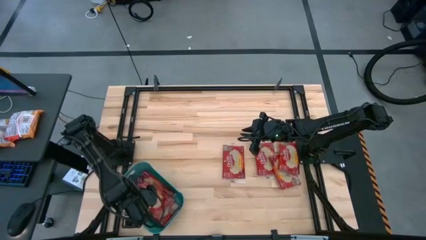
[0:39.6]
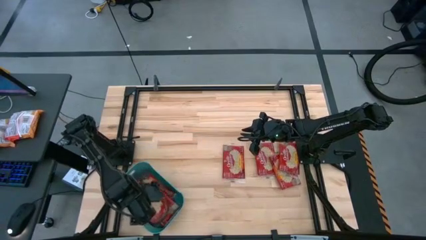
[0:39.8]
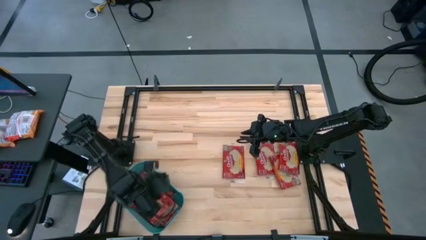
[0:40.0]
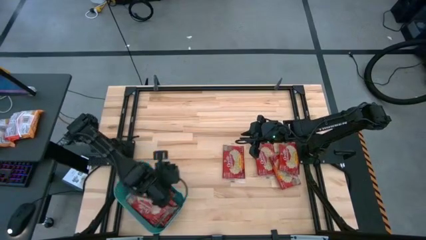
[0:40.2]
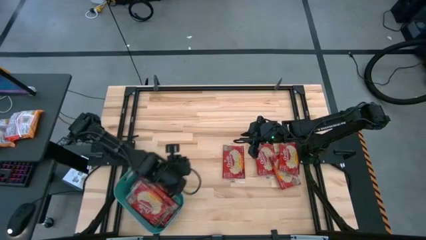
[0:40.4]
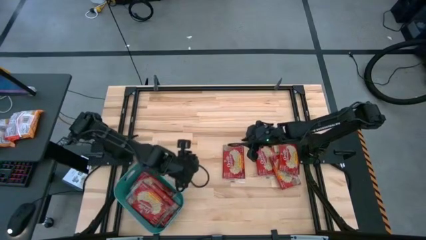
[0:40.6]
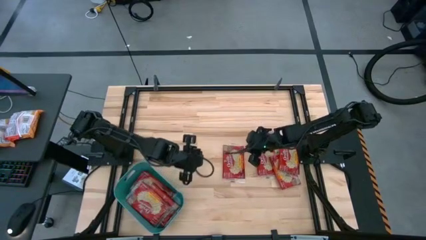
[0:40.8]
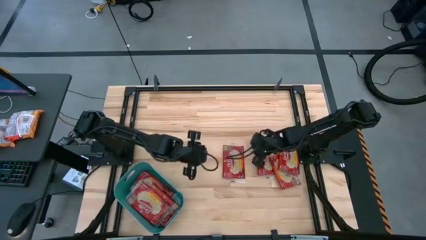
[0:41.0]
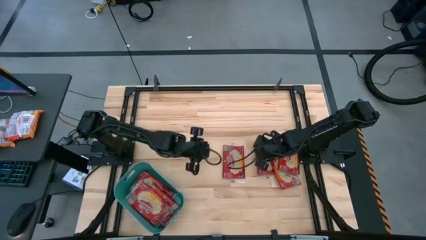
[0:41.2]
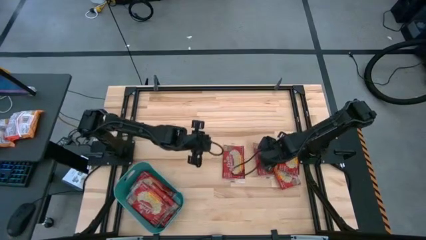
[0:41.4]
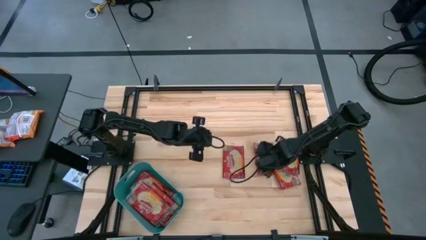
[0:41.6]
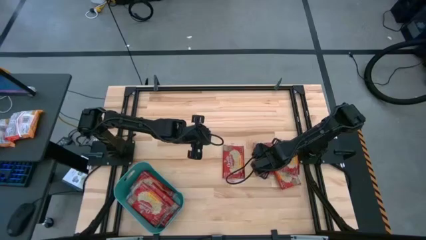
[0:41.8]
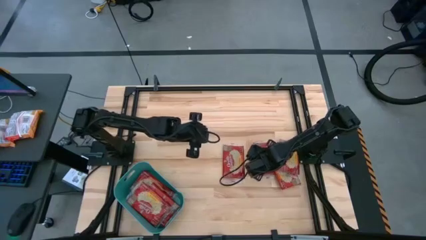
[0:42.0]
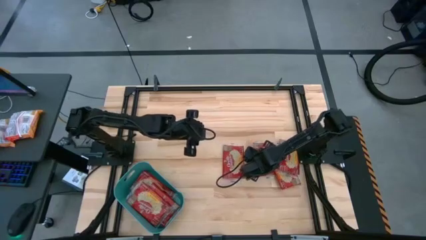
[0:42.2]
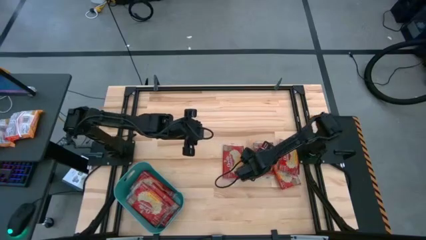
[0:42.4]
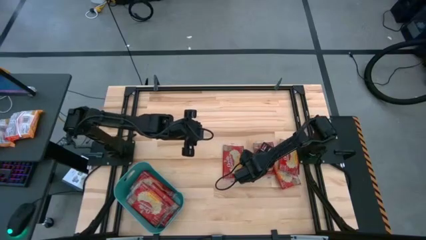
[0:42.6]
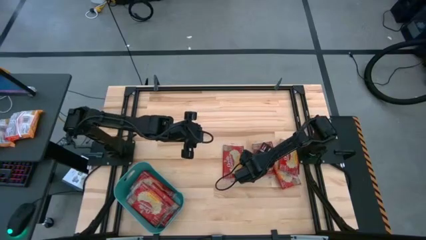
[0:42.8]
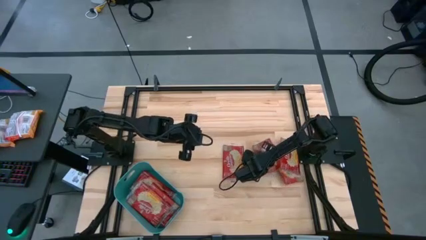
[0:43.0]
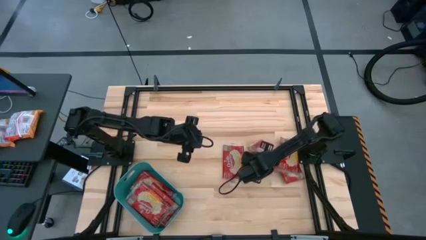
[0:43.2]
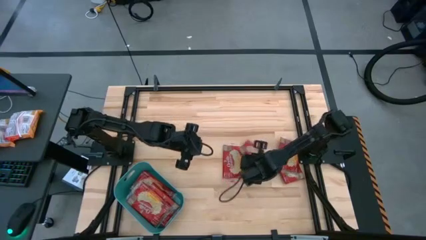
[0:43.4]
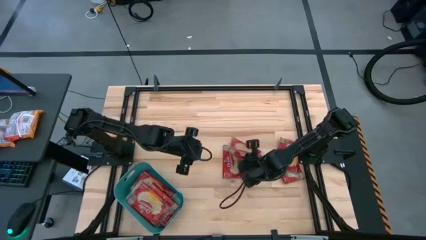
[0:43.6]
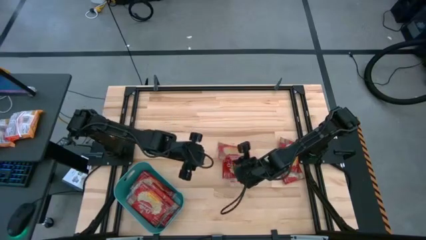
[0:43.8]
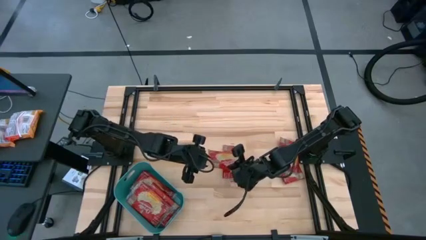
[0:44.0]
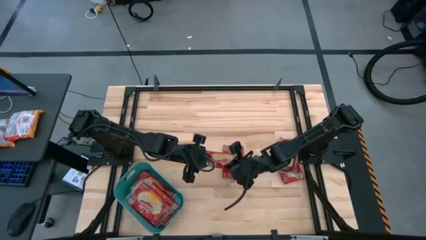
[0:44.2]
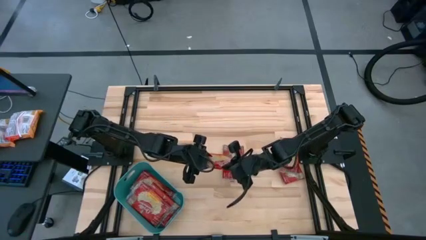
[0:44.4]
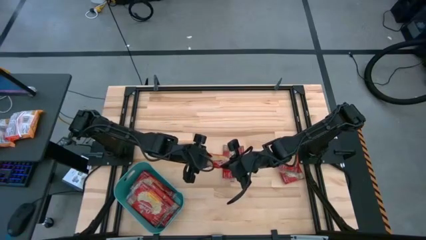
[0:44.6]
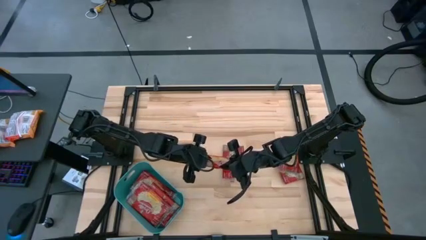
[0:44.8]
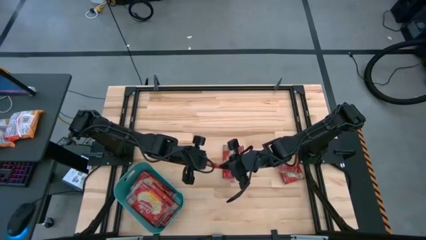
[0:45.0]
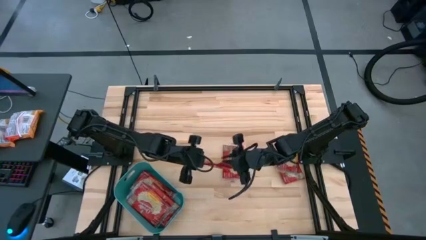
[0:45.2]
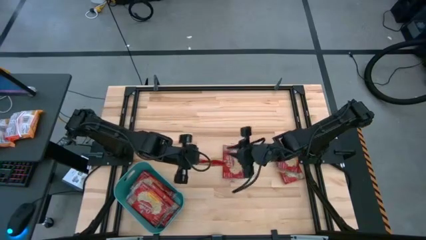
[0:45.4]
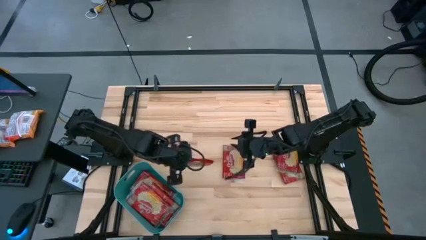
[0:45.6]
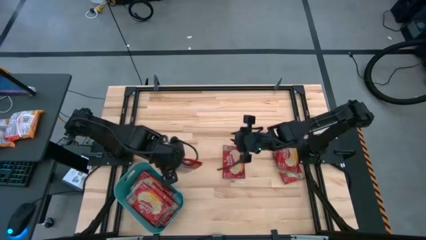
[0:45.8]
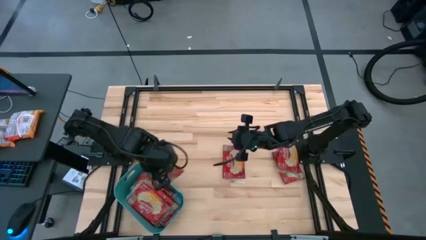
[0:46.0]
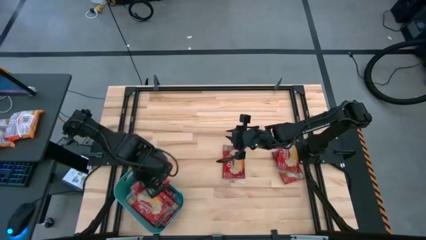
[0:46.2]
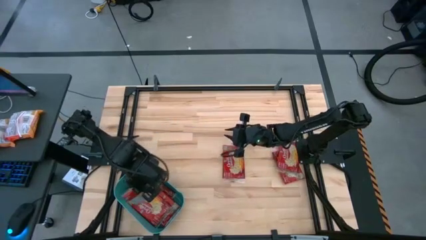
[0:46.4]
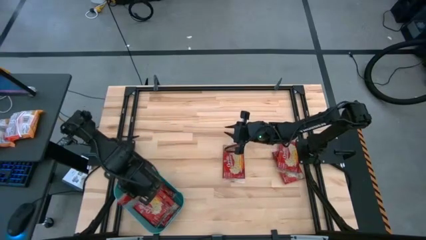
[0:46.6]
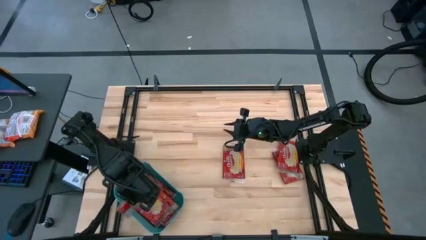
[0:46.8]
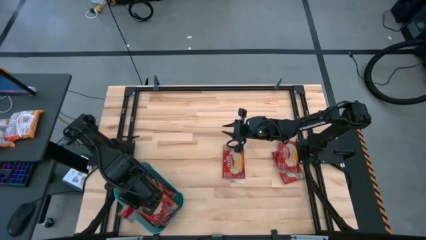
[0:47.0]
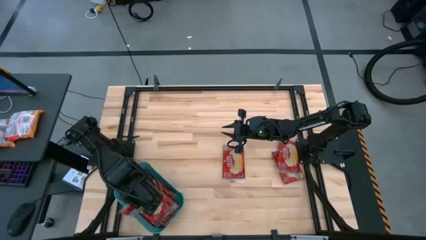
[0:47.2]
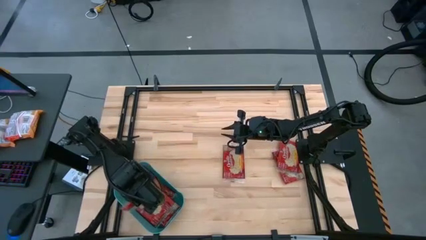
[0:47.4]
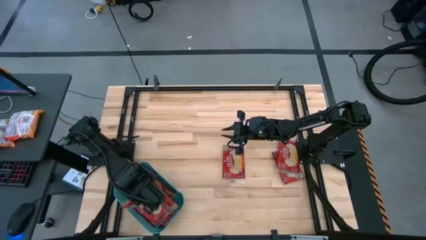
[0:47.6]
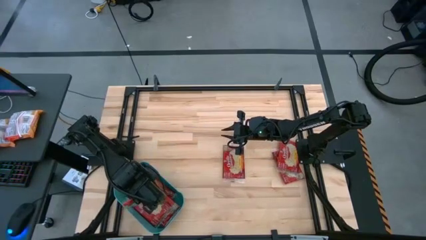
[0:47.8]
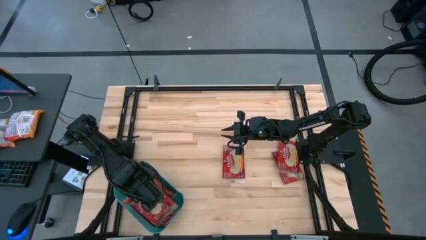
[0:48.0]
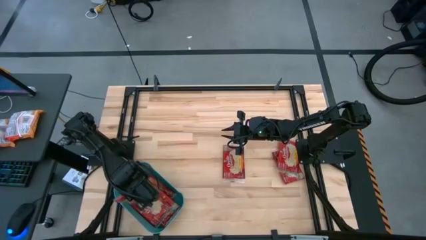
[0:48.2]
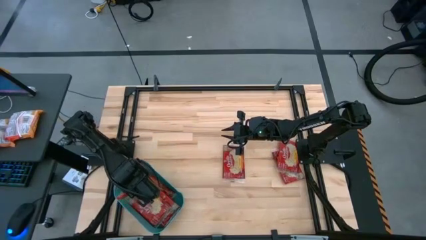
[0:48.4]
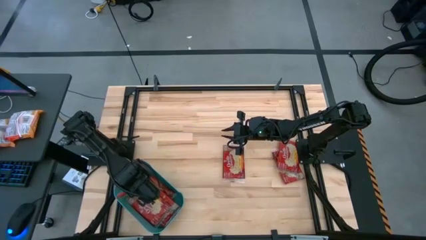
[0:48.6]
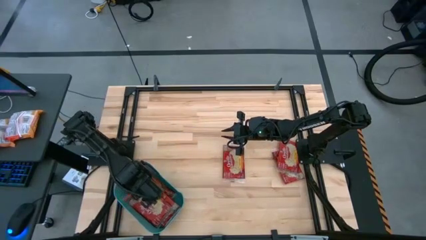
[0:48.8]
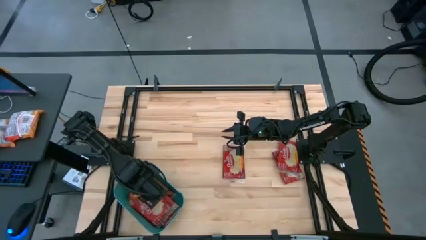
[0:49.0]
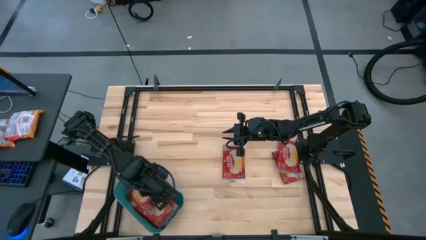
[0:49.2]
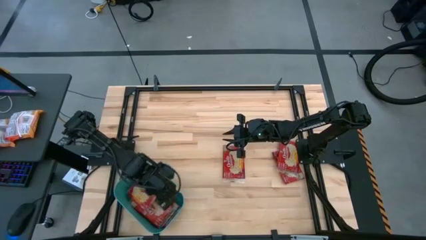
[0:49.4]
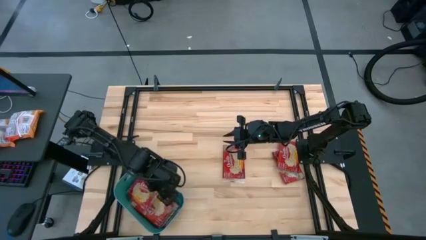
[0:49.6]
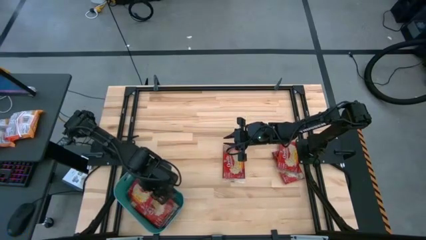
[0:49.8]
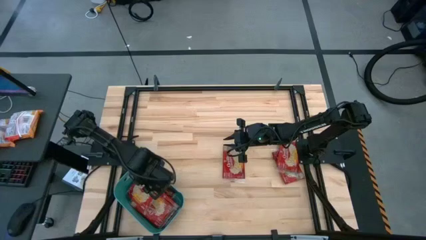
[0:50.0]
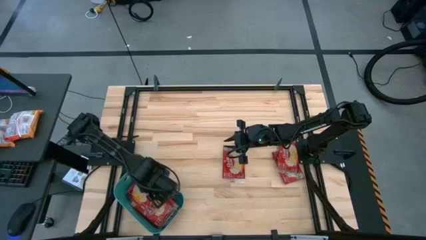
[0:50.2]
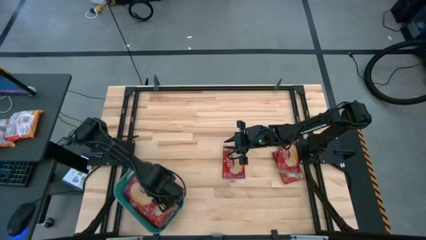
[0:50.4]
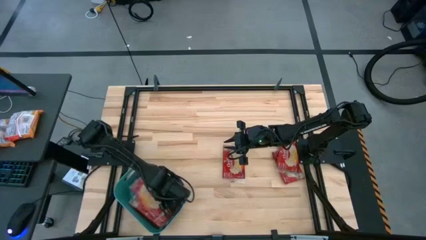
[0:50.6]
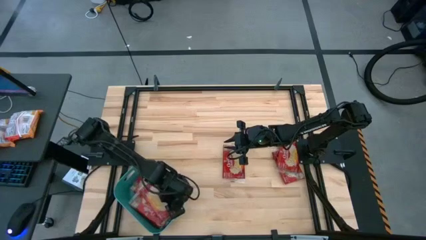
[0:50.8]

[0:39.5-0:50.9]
Task: Sort popcorn bags into baskets
Put the popcorn bag into the blue bin
